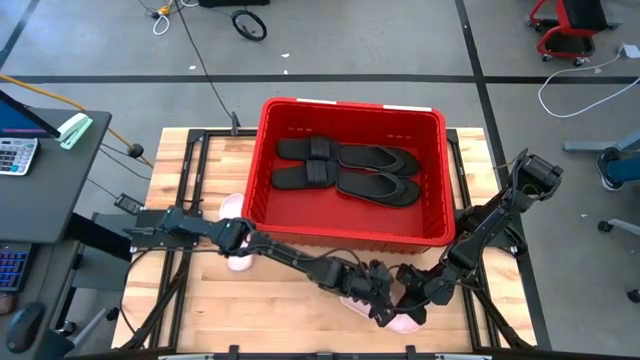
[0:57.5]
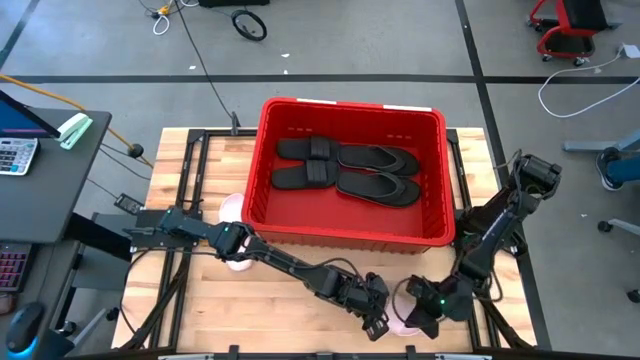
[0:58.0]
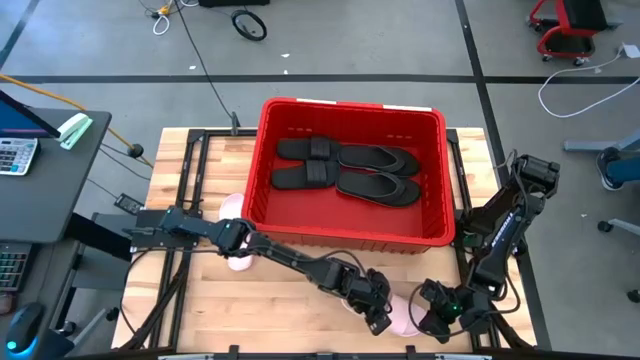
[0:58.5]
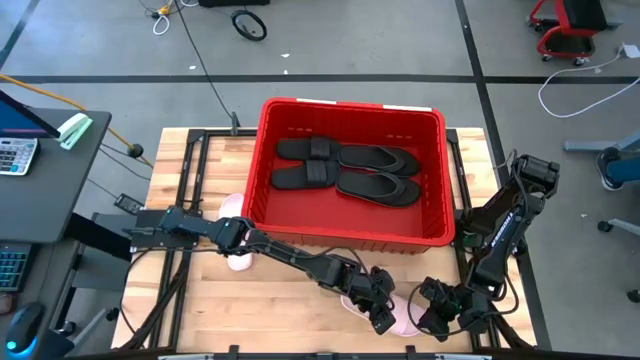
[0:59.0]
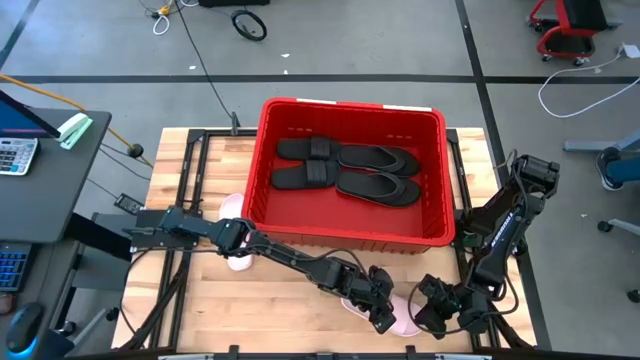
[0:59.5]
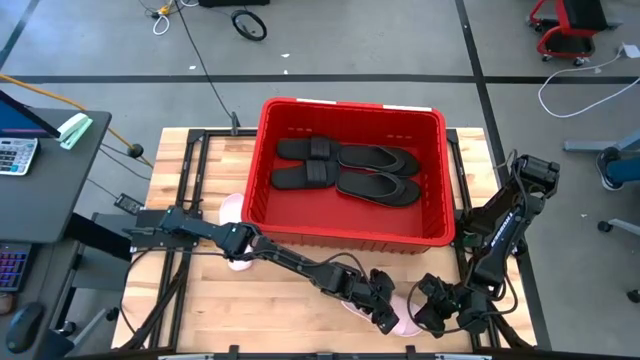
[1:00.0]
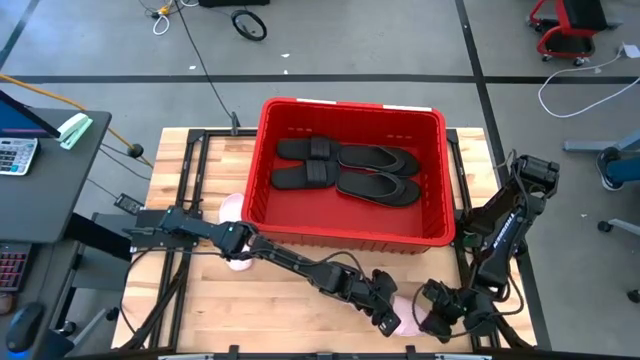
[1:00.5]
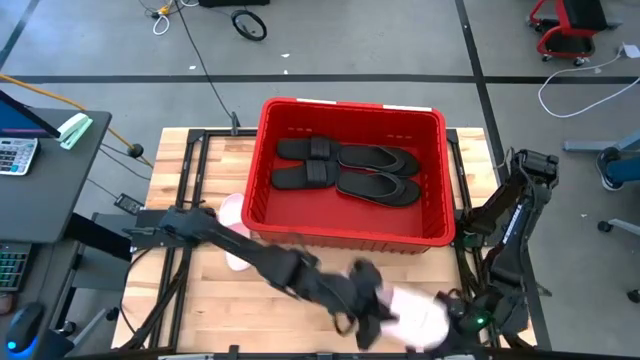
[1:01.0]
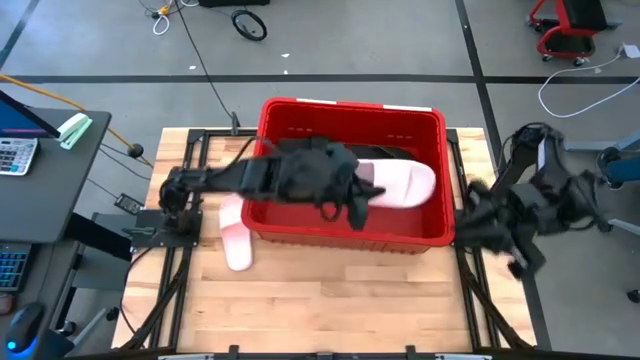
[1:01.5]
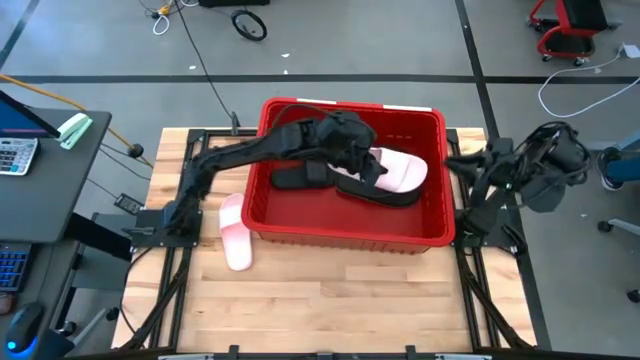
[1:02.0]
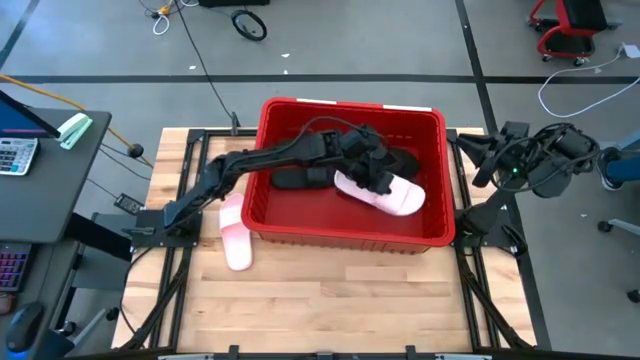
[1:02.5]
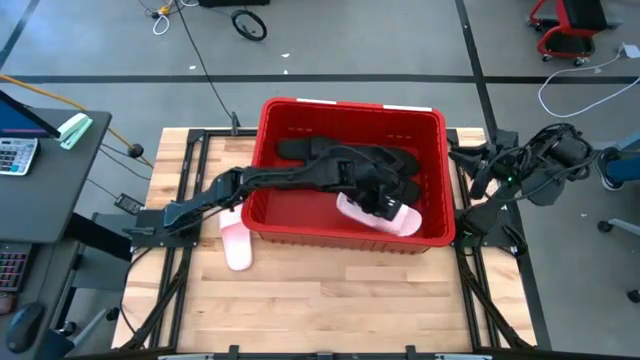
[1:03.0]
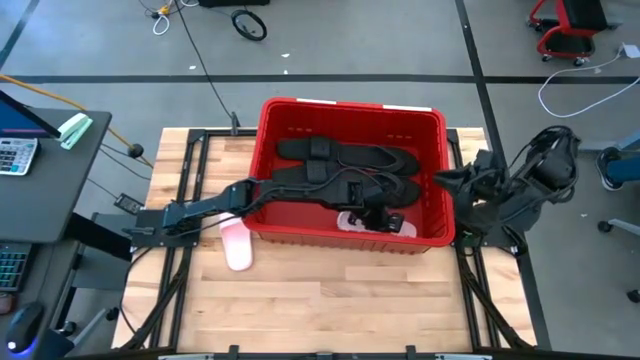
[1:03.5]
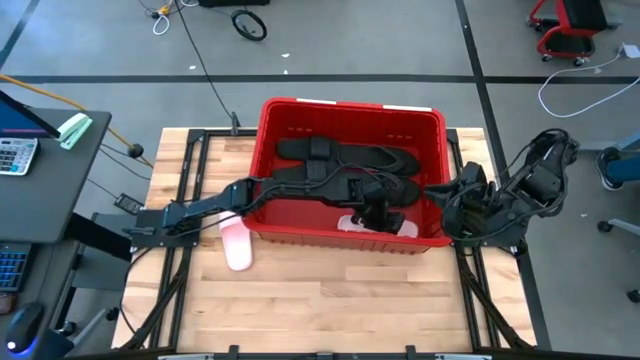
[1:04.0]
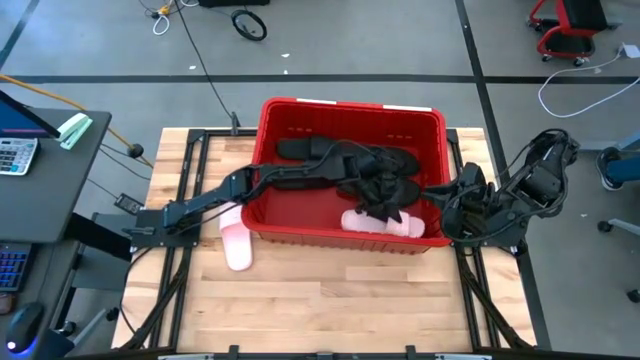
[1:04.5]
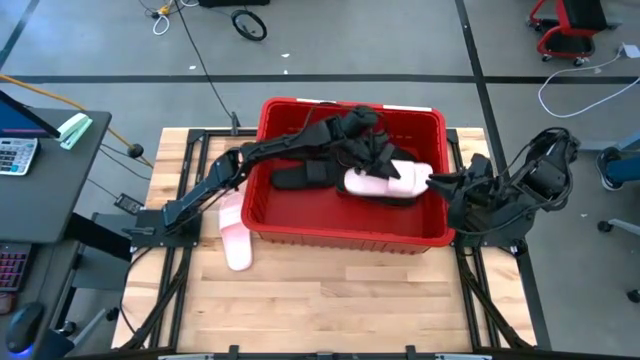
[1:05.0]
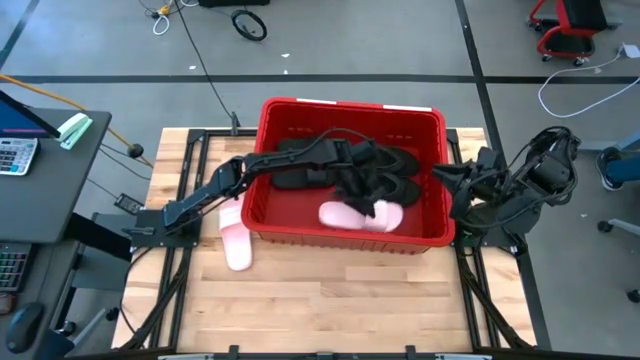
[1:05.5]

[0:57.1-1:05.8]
Task: Pick and place slides into bin
Put the right pink slide into the red bin

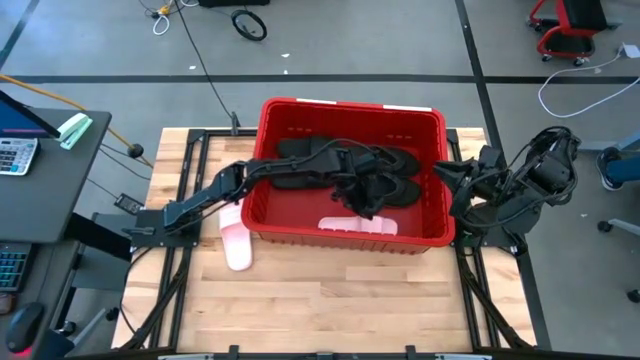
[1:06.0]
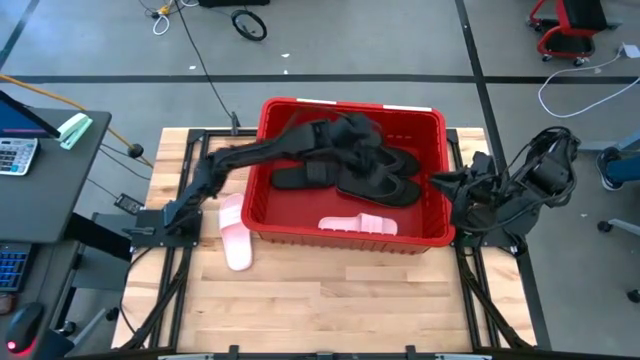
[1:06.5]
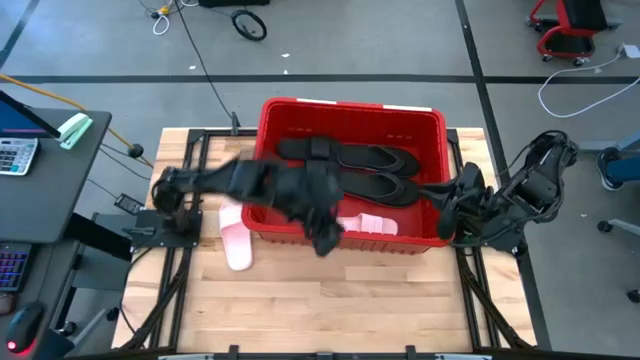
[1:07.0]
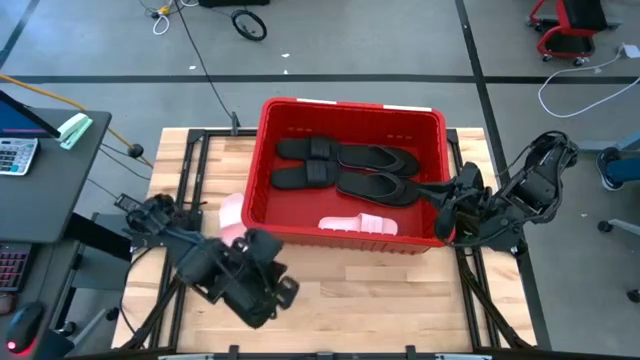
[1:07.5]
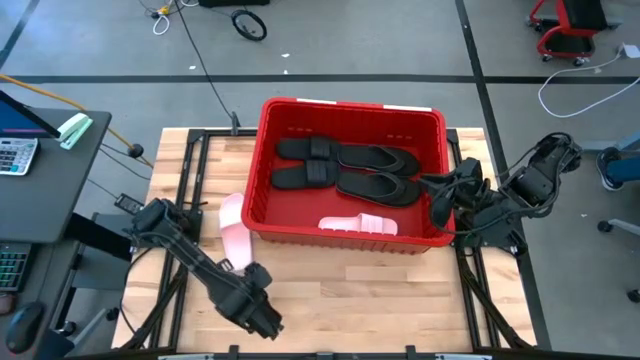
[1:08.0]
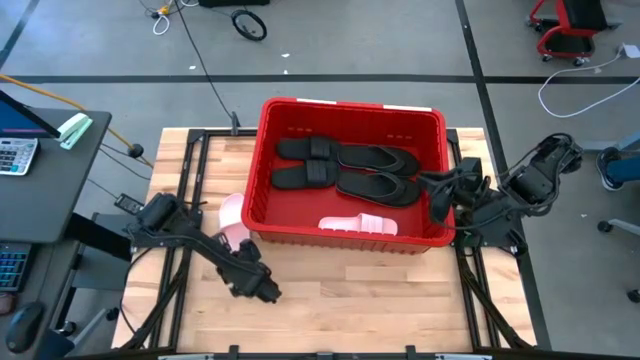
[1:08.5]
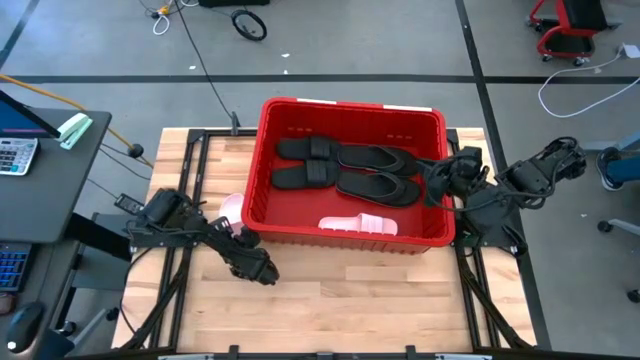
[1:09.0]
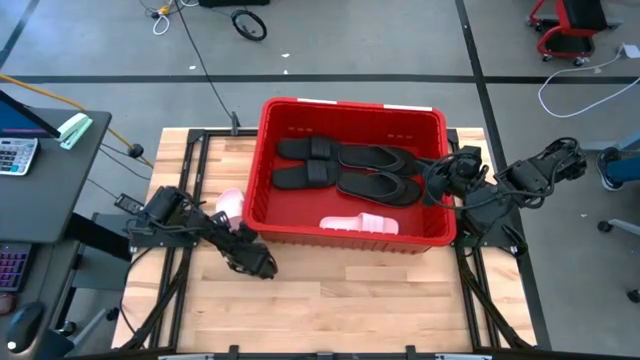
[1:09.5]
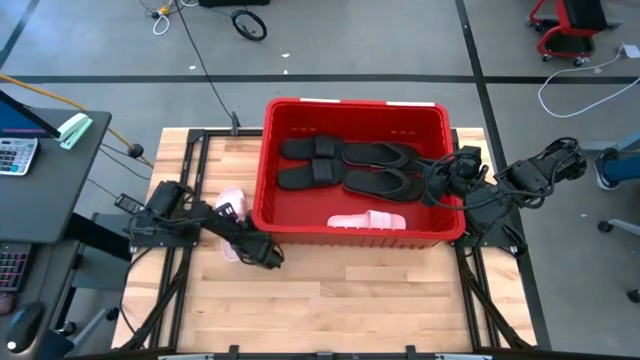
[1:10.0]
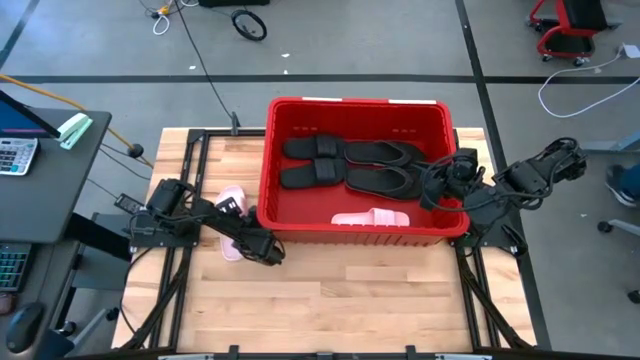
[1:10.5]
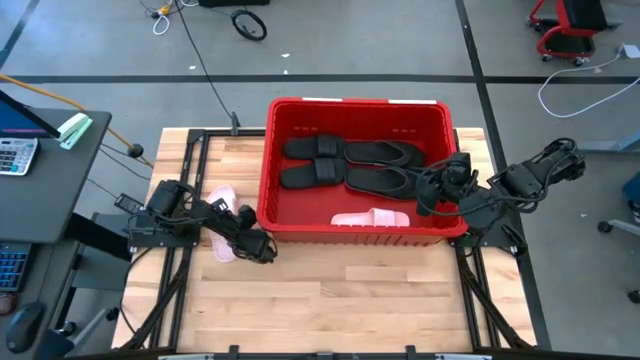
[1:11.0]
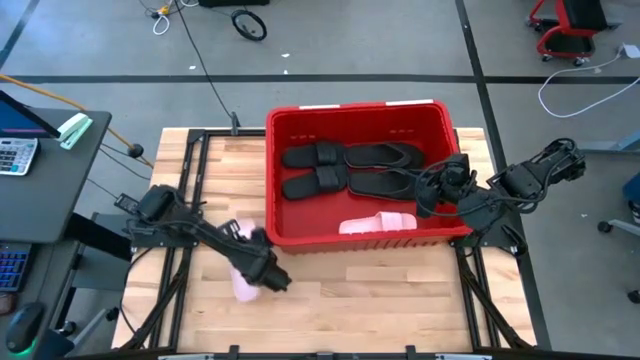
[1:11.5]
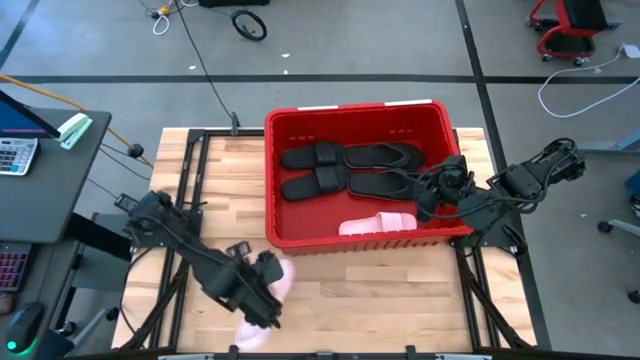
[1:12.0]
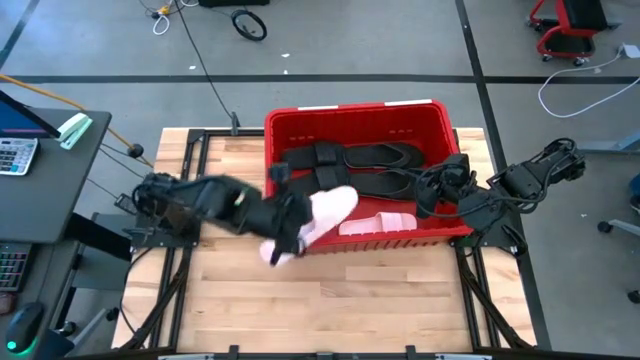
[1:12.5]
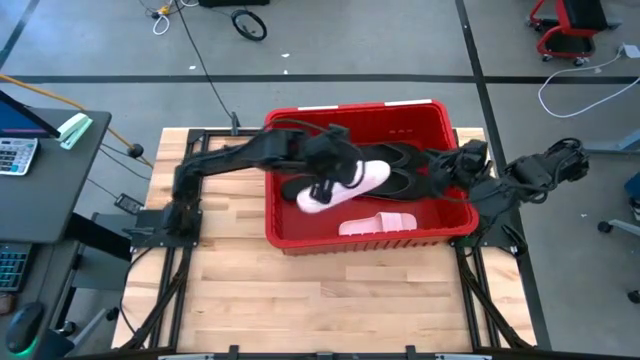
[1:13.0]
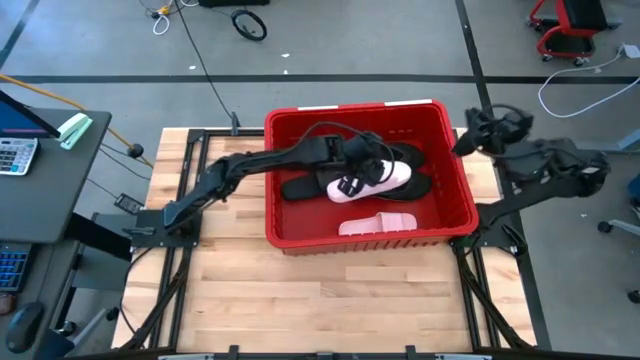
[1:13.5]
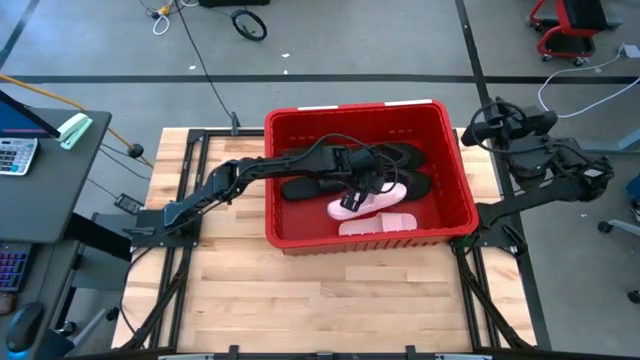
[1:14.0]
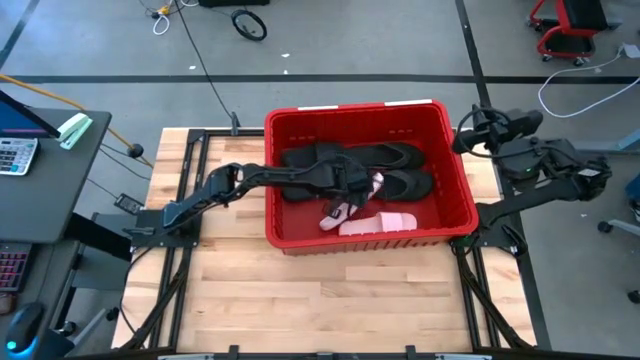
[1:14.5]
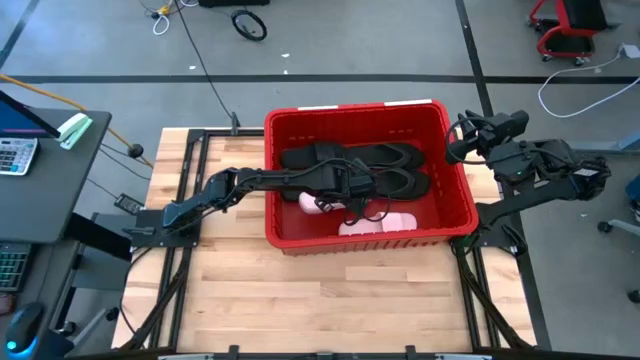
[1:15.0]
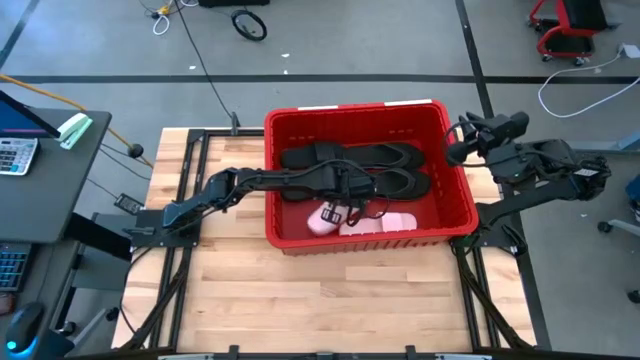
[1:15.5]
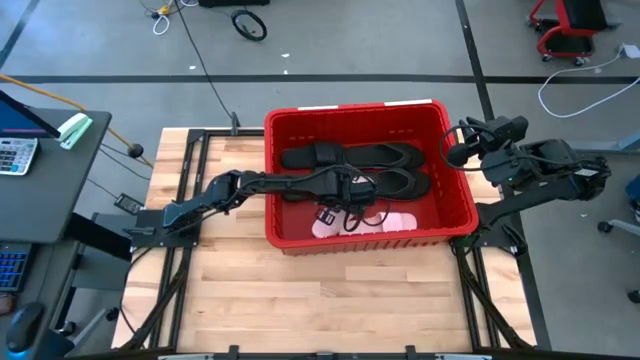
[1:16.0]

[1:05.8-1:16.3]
Put the pink slide into the red bin

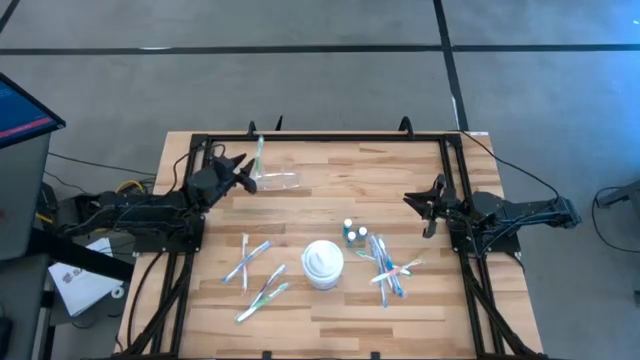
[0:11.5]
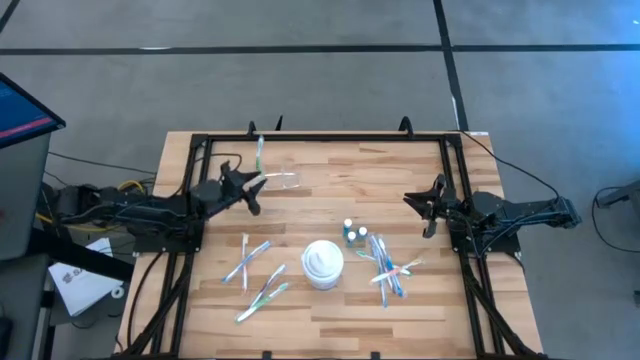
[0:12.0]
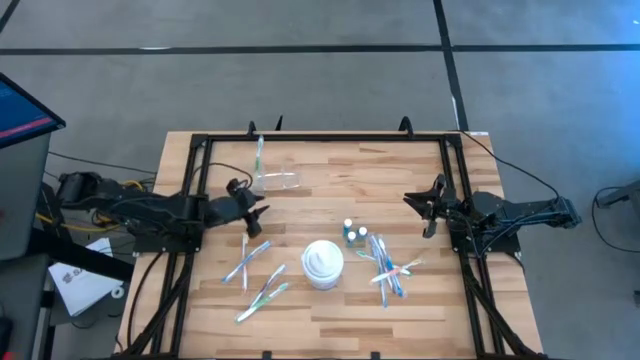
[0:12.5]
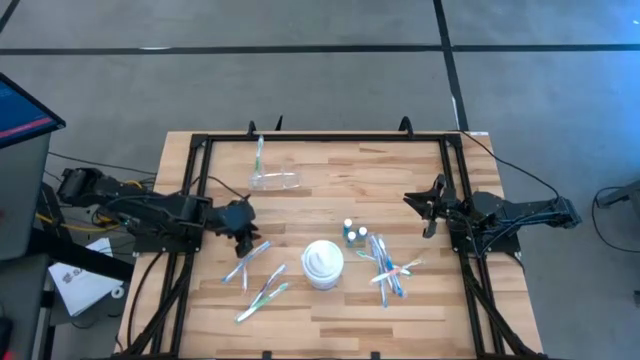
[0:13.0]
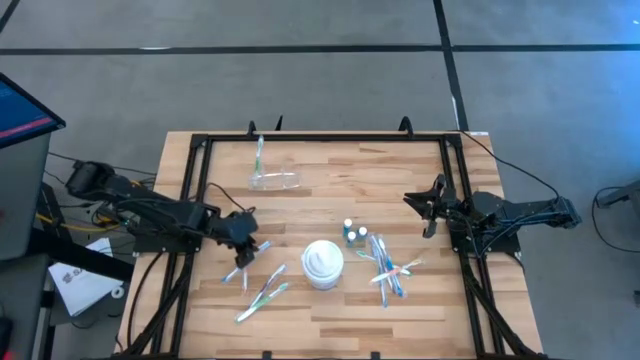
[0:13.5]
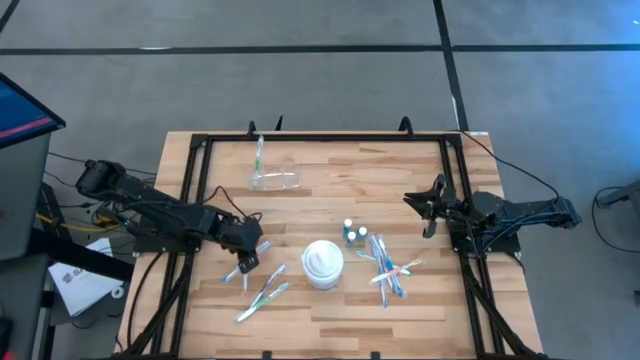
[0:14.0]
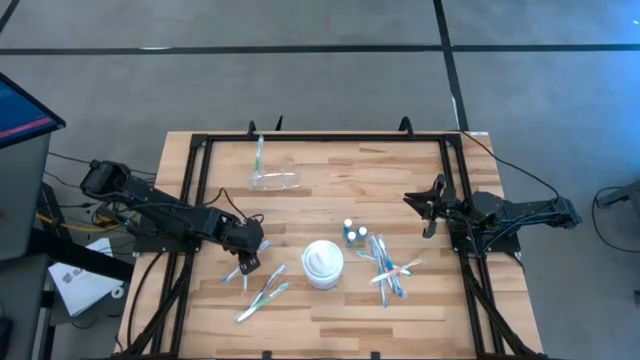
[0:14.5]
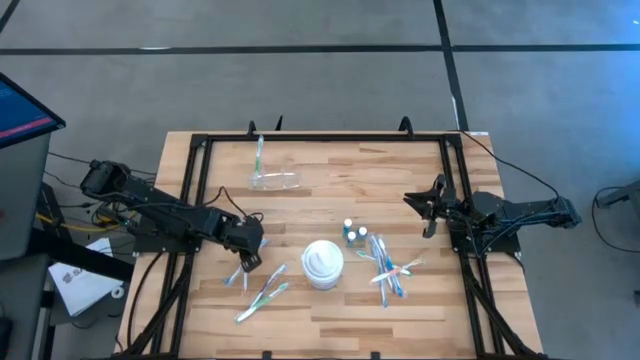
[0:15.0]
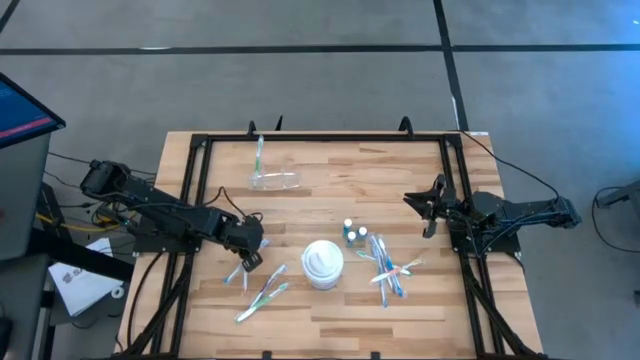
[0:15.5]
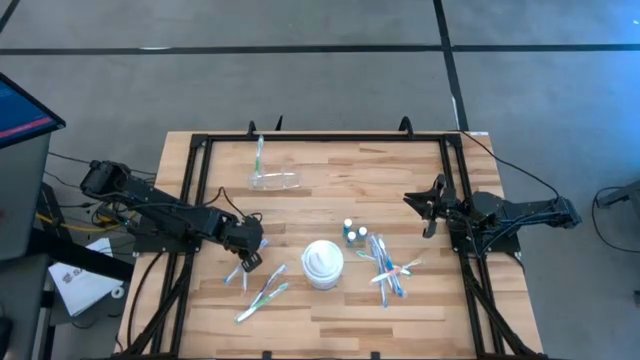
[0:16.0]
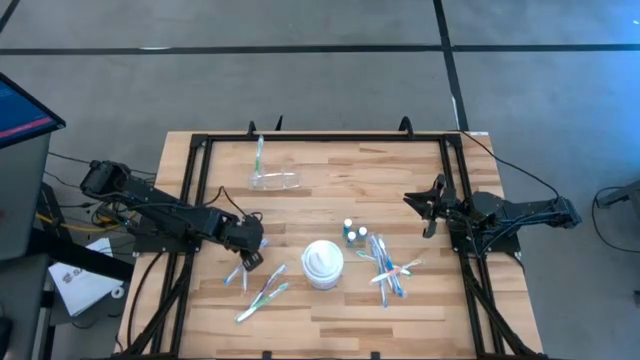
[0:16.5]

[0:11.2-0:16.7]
Task: Pick & Place toothbrushing station
Put the left blue toothbrush into the transparent organizer
